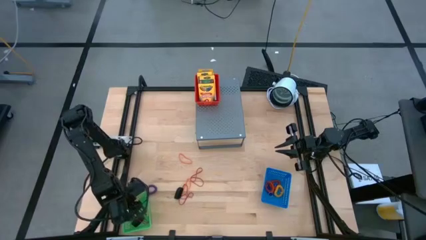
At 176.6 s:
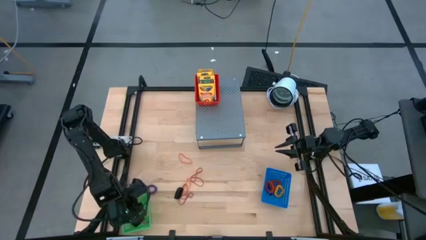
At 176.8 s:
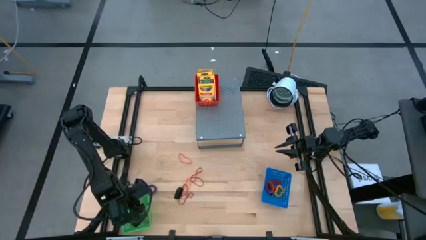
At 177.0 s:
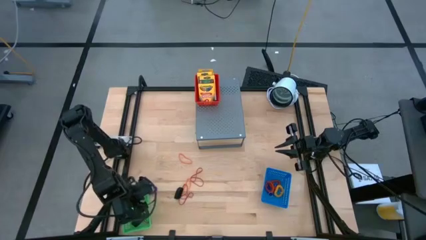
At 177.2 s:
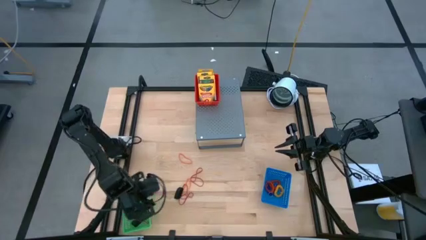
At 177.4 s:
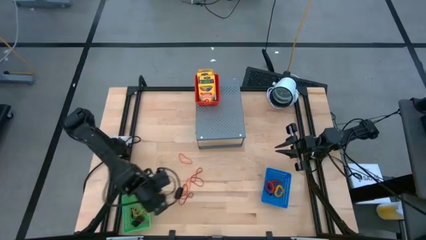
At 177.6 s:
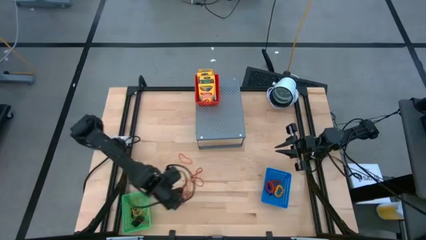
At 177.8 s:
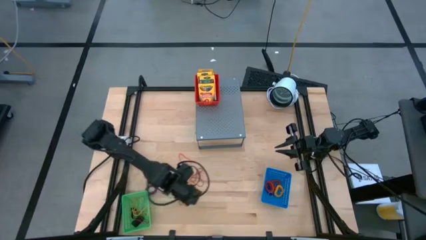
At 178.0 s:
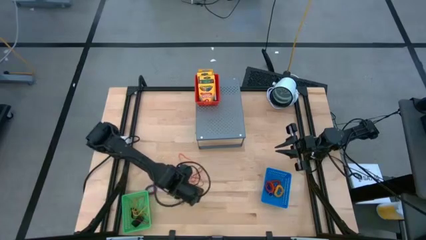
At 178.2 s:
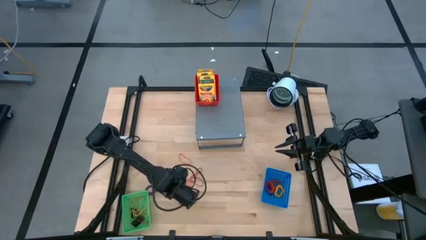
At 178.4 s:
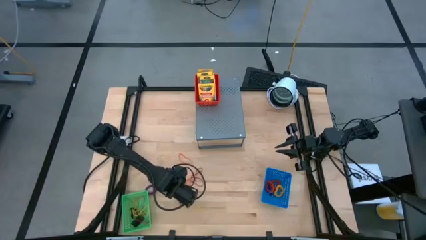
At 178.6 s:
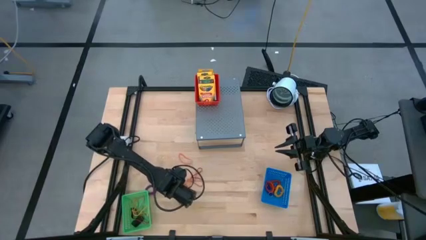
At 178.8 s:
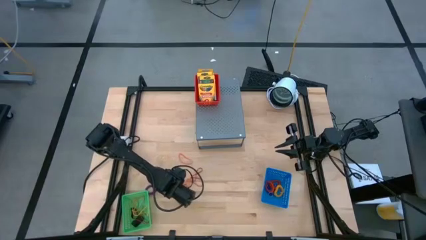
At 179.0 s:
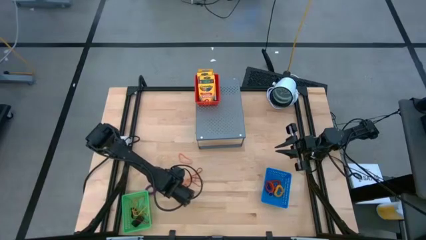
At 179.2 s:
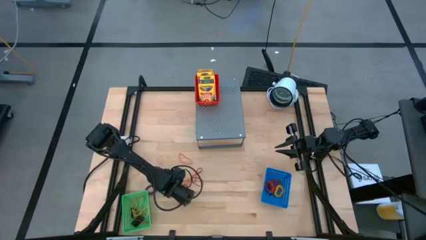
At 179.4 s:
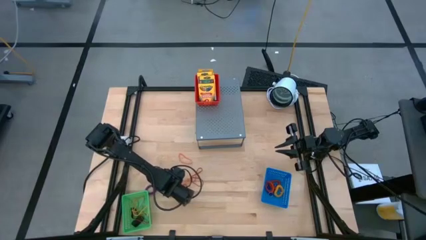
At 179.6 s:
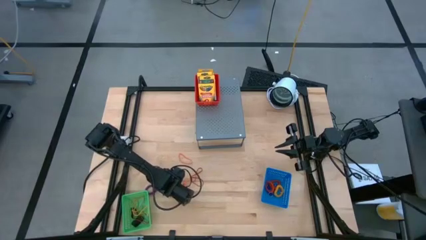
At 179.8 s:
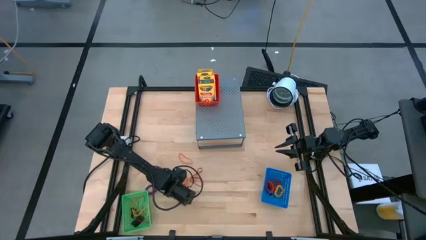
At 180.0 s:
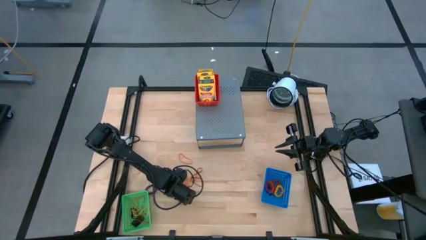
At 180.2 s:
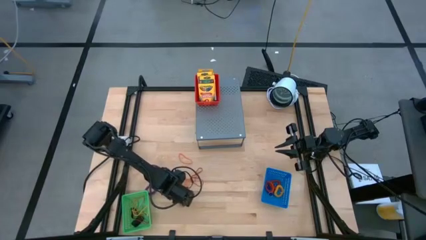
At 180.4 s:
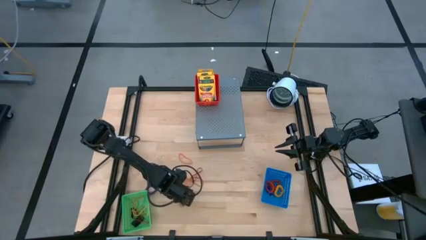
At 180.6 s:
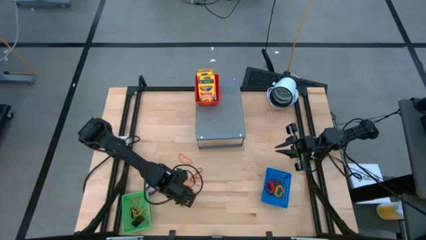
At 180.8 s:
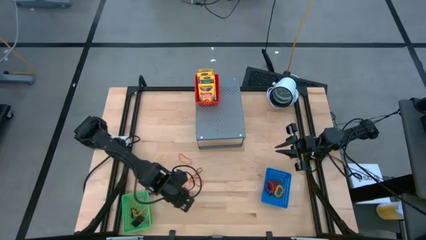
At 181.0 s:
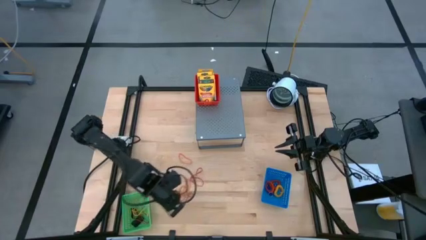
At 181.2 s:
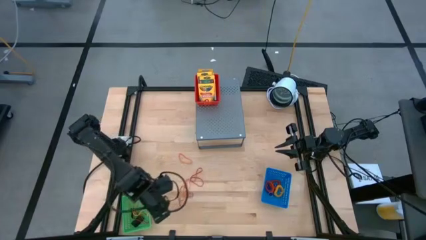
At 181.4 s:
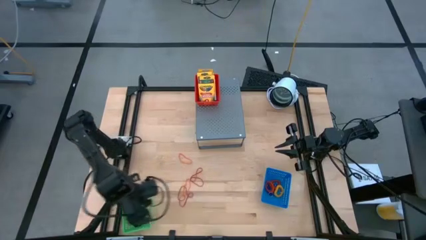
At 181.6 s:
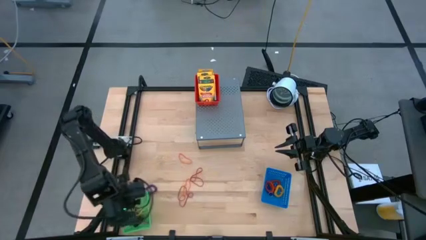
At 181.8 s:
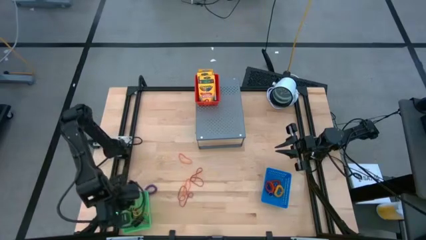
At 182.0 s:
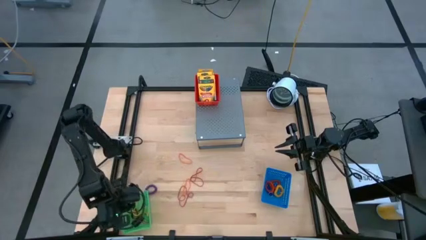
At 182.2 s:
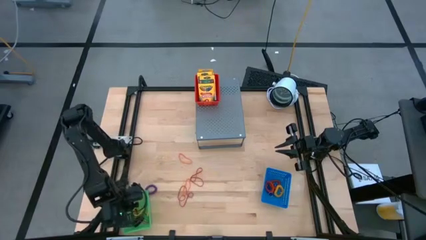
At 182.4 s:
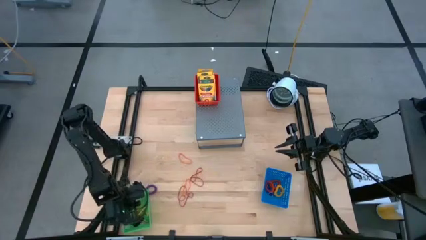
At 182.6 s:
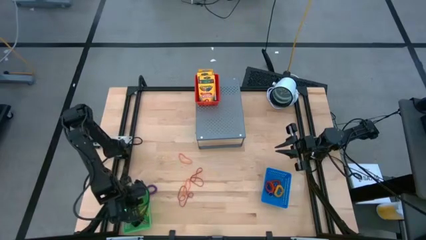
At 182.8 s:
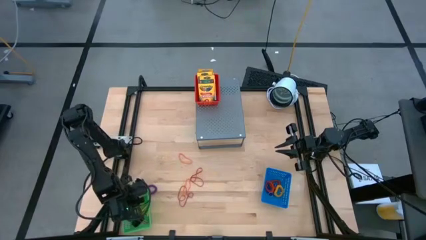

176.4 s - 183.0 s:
Task: Pick & Place Office Desk Supplies
Put the black rubber band into the green bin

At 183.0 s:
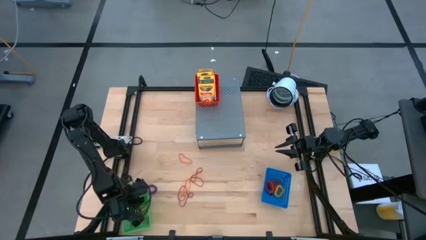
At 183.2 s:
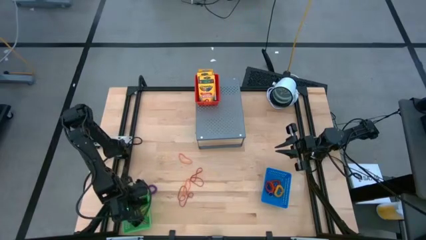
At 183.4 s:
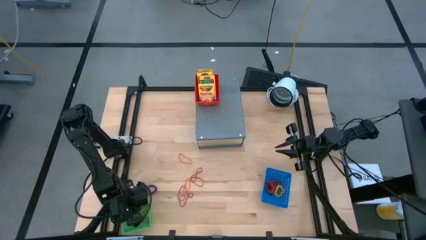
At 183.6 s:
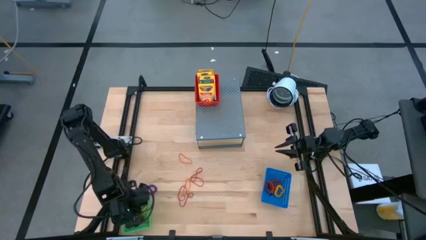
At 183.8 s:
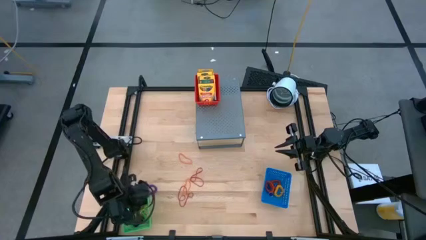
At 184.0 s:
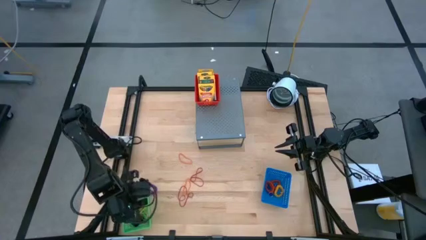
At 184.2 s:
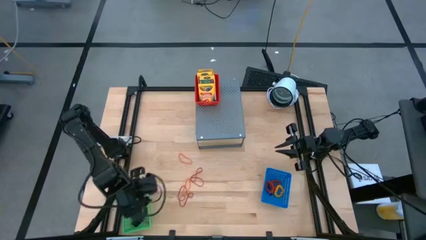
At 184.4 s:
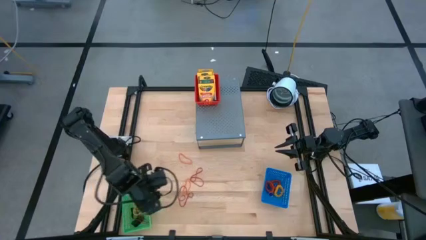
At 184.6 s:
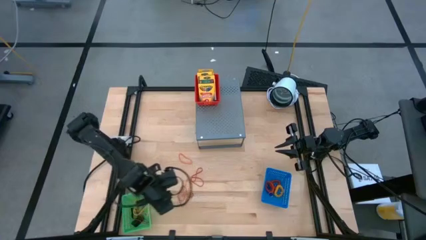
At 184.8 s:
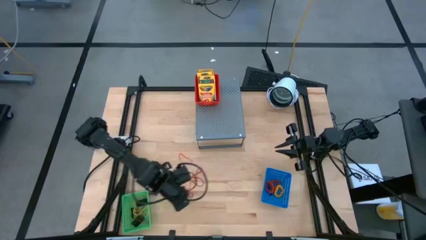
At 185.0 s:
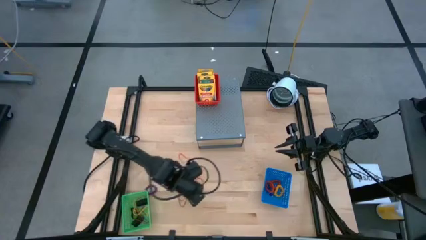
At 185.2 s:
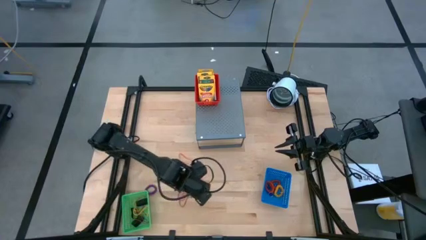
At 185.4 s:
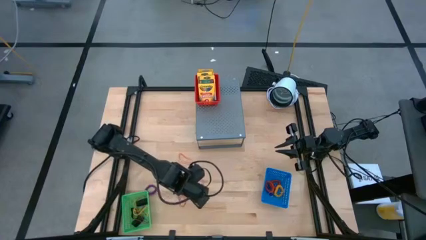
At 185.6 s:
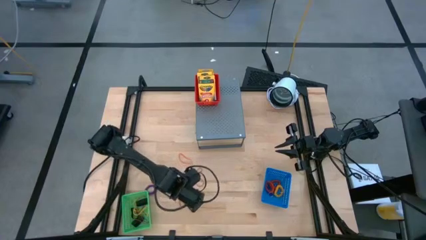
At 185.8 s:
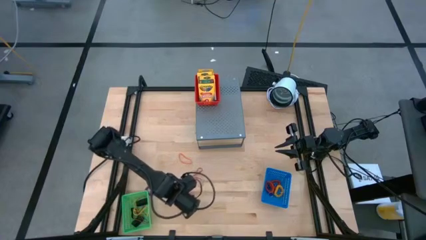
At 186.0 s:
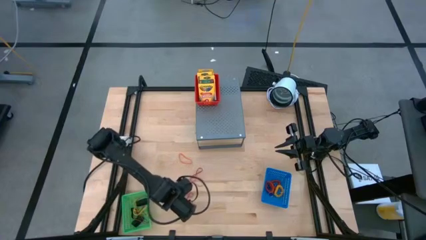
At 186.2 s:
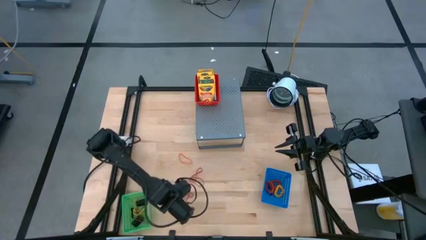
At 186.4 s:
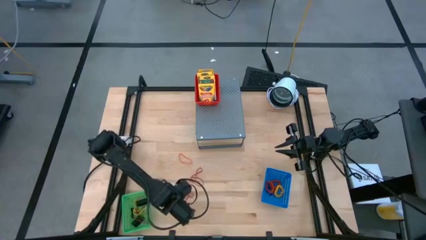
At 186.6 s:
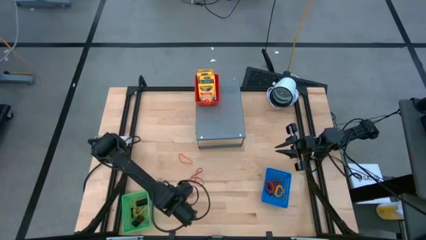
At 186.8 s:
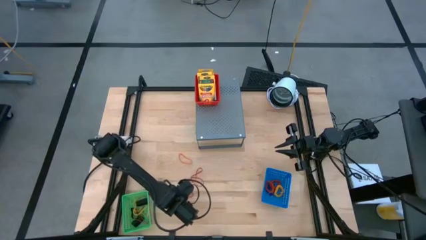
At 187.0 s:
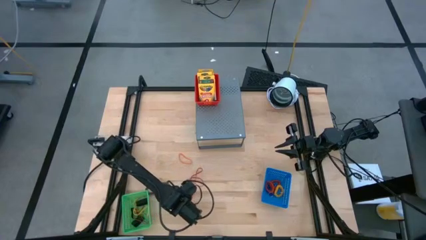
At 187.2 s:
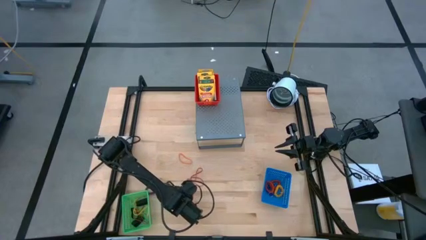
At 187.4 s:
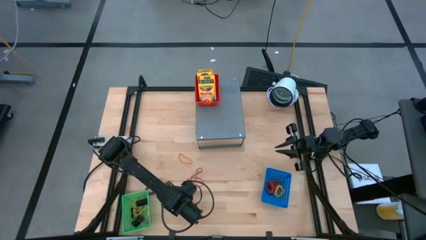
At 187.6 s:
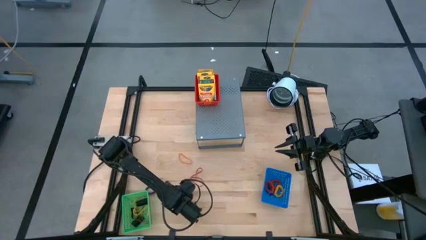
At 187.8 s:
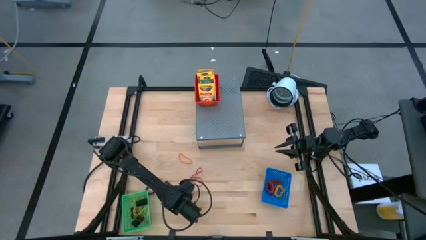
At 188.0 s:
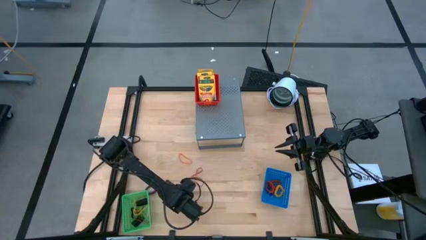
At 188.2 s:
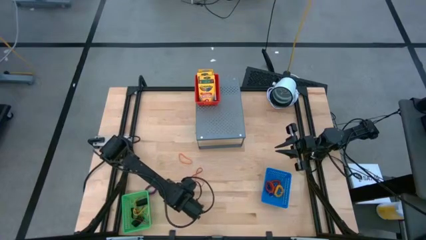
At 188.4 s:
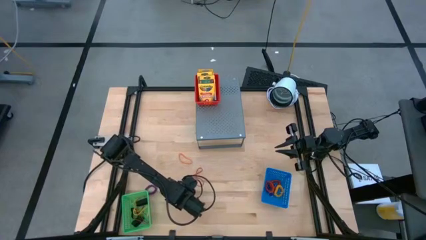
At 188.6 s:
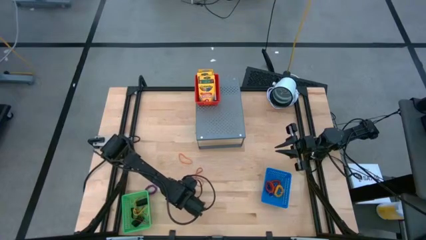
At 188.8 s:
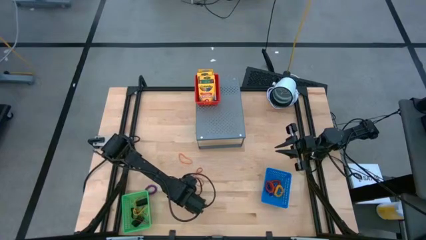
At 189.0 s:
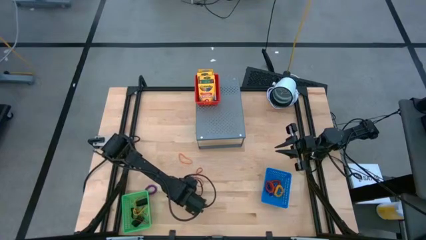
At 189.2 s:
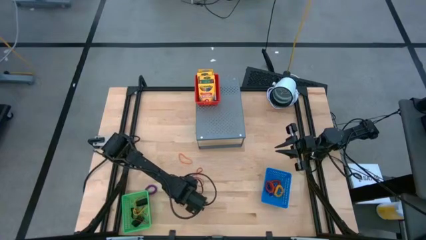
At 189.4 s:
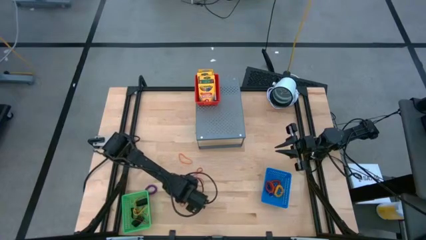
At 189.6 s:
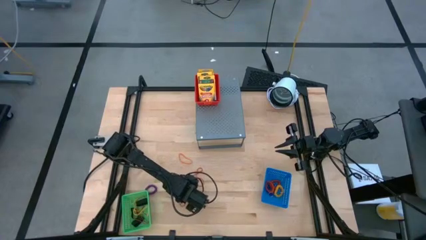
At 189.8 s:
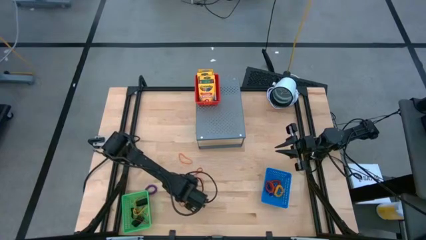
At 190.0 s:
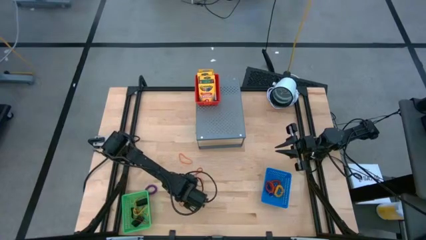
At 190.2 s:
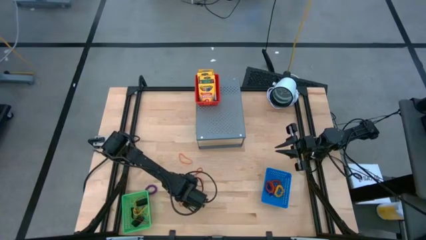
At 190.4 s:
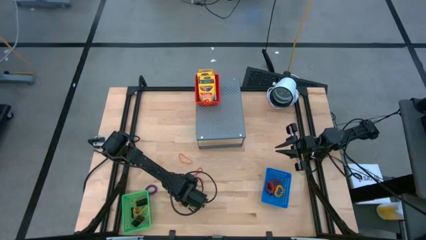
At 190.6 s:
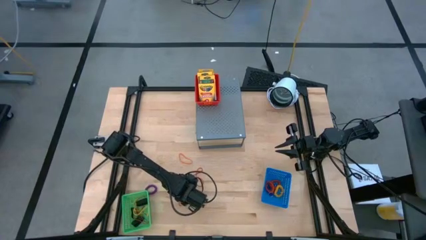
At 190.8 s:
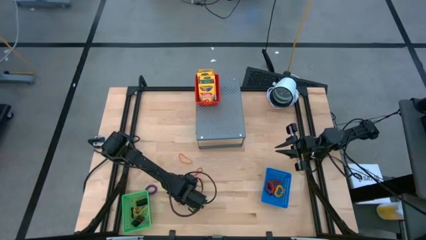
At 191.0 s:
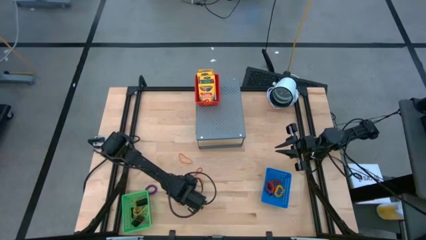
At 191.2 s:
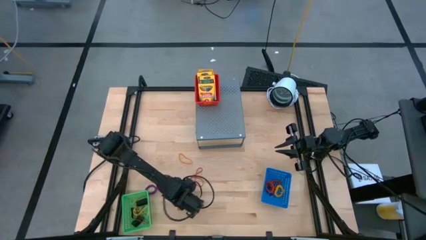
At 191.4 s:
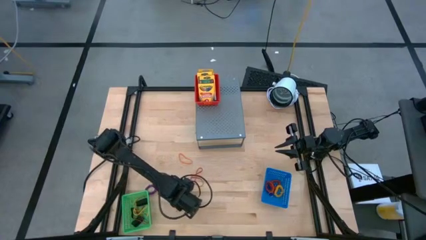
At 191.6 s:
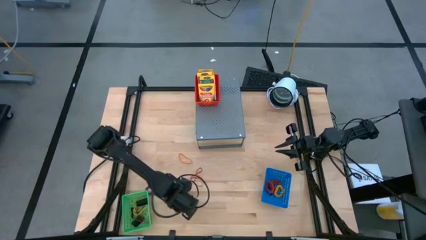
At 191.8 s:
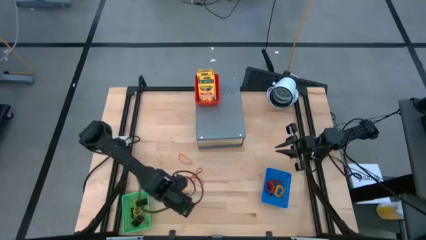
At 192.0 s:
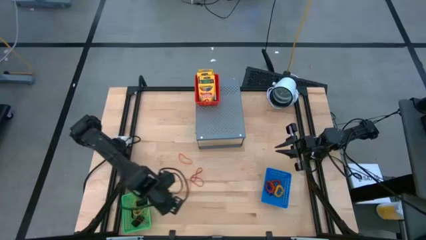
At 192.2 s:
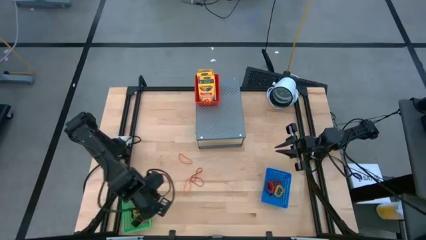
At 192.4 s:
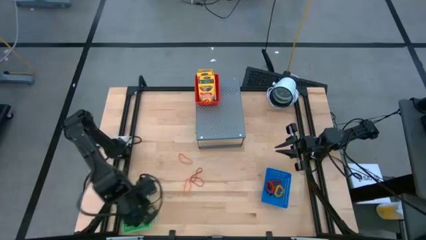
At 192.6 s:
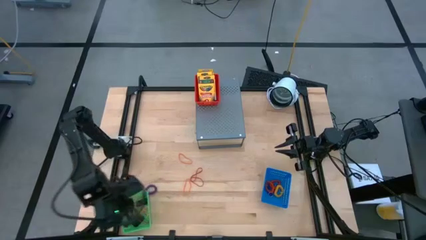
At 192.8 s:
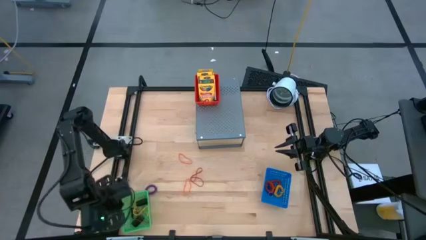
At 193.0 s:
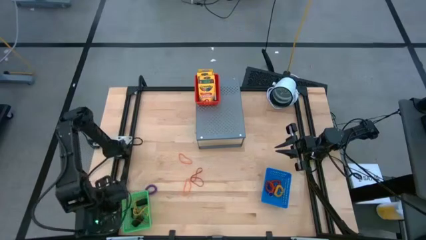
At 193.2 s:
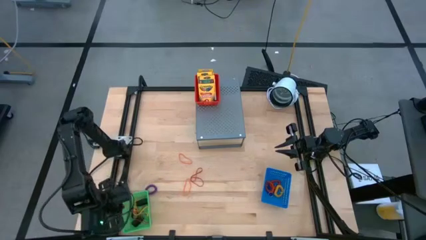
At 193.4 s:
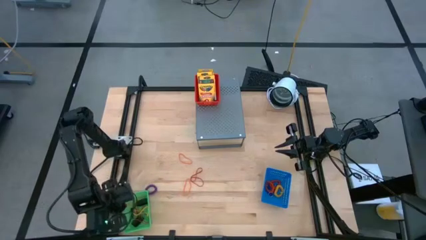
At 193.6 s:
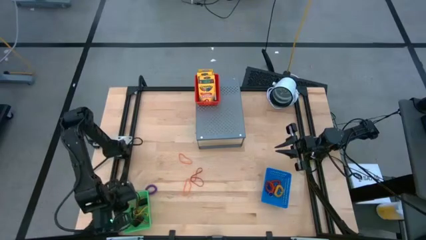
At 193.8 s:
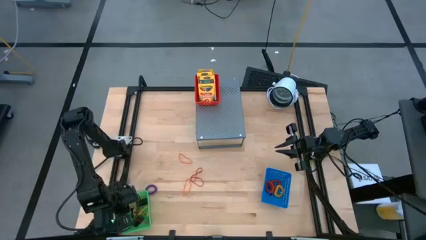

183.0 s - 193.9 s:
Put the red rubber band into the green bin
